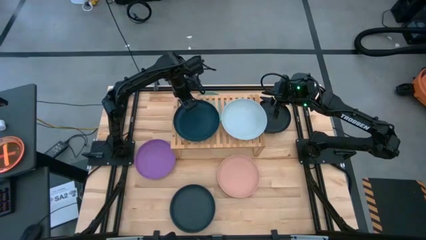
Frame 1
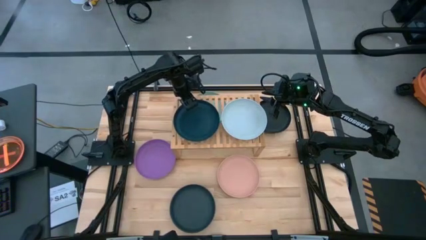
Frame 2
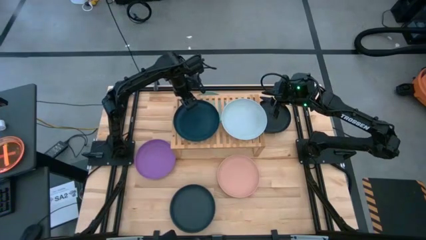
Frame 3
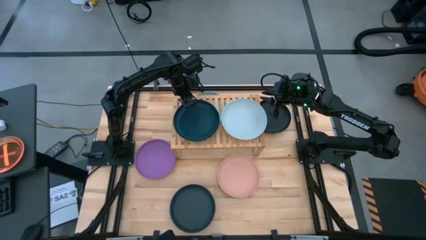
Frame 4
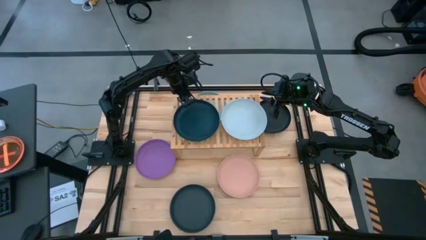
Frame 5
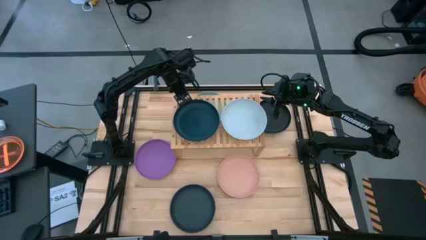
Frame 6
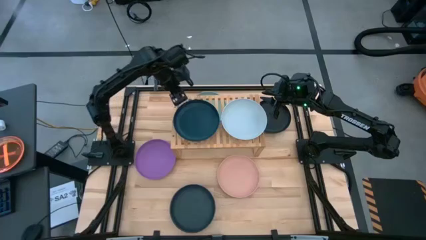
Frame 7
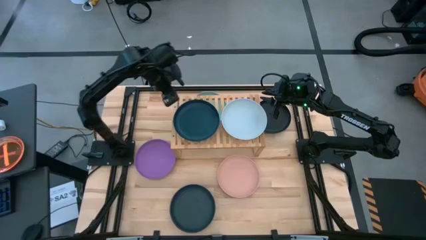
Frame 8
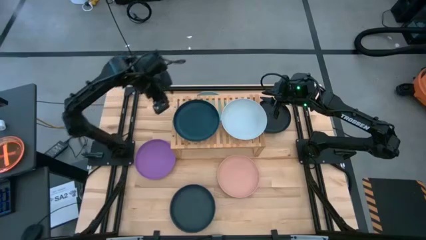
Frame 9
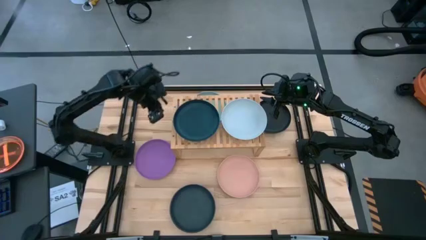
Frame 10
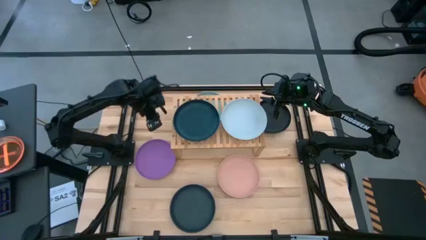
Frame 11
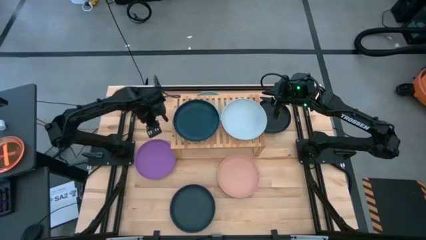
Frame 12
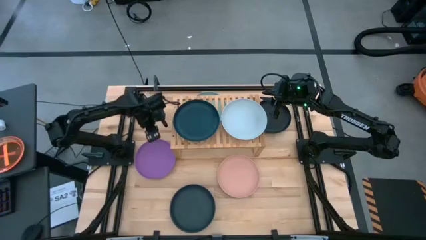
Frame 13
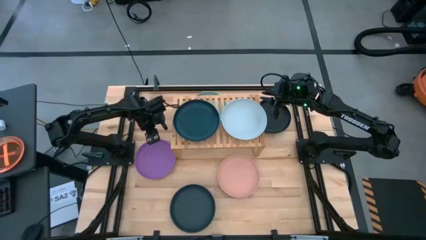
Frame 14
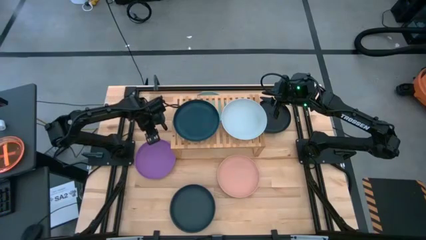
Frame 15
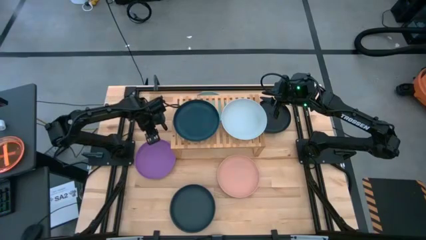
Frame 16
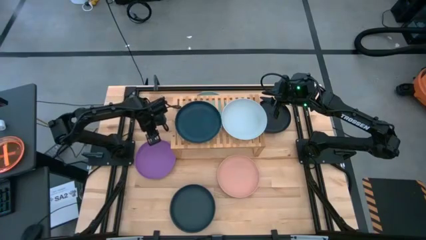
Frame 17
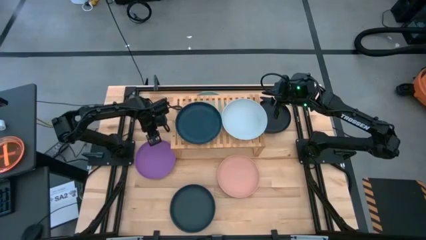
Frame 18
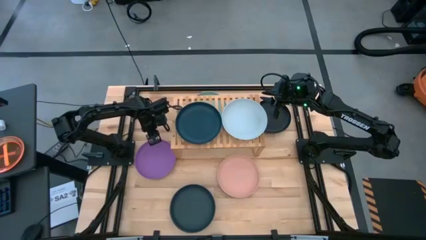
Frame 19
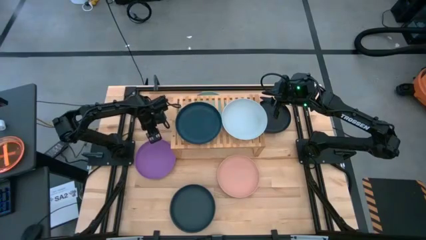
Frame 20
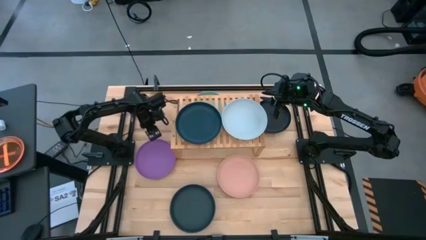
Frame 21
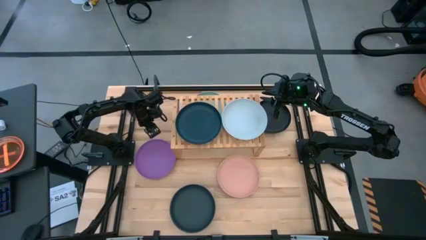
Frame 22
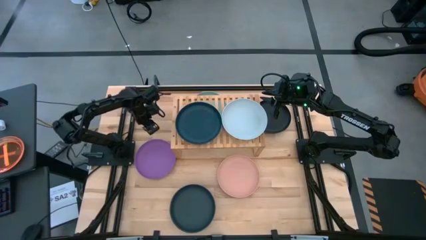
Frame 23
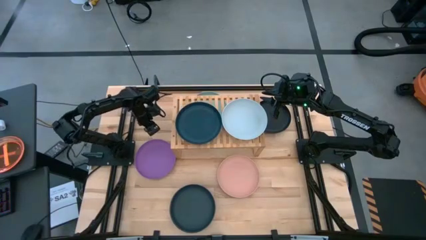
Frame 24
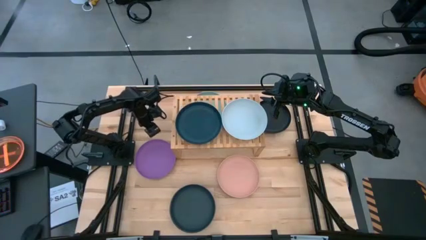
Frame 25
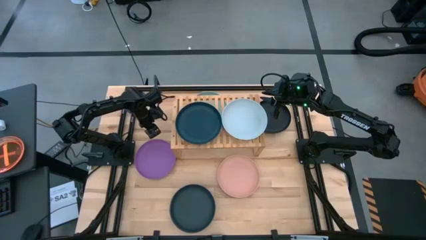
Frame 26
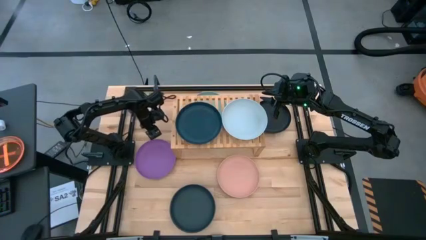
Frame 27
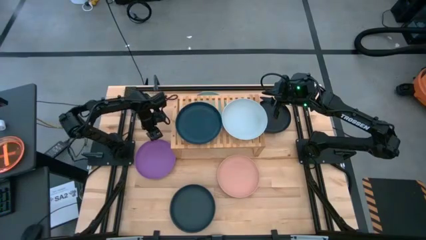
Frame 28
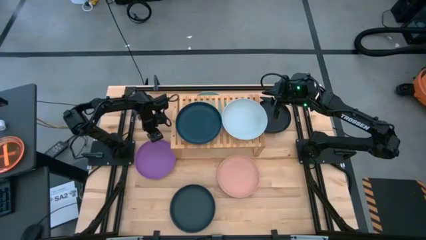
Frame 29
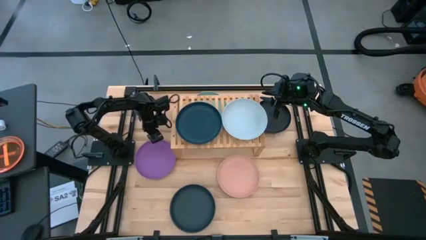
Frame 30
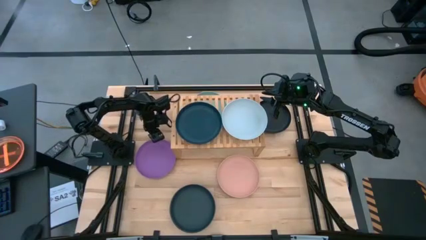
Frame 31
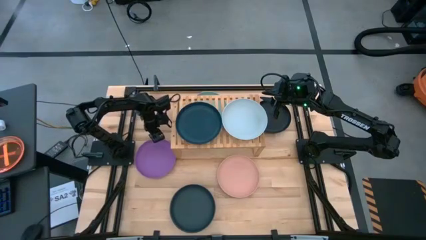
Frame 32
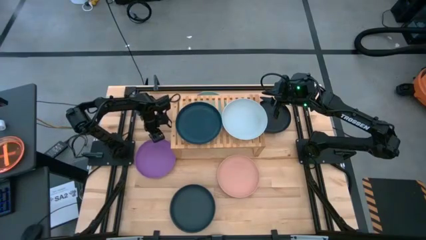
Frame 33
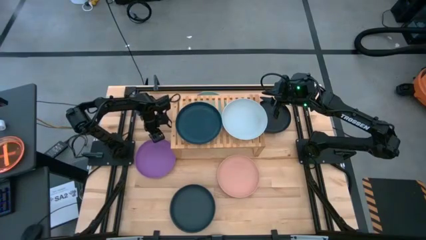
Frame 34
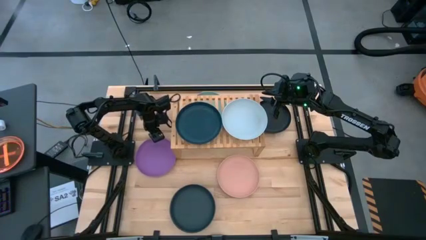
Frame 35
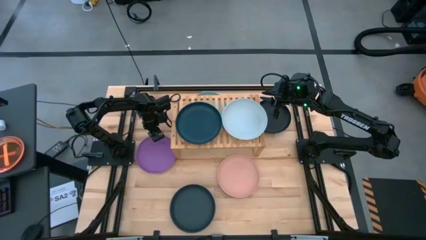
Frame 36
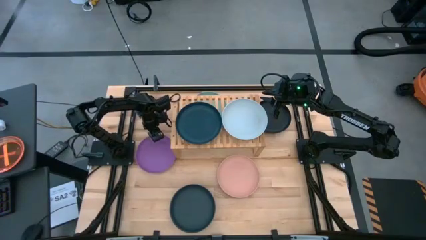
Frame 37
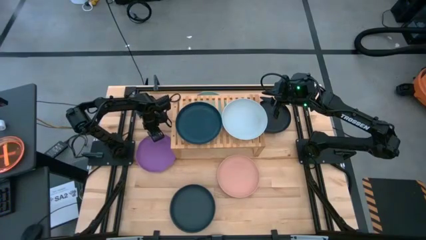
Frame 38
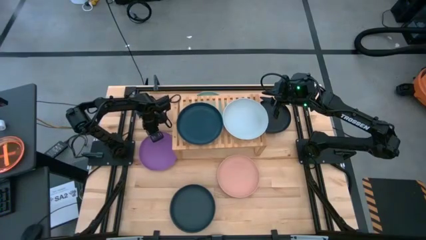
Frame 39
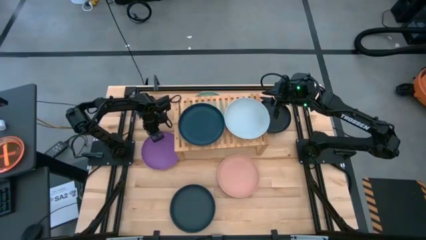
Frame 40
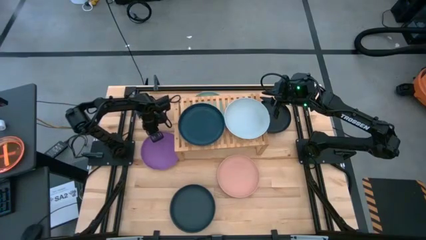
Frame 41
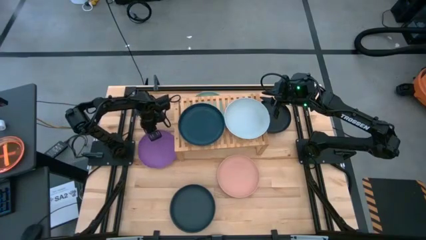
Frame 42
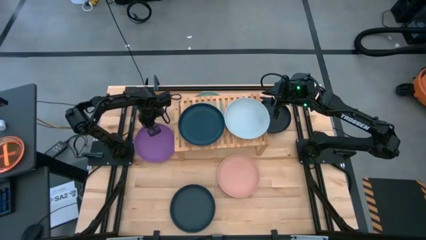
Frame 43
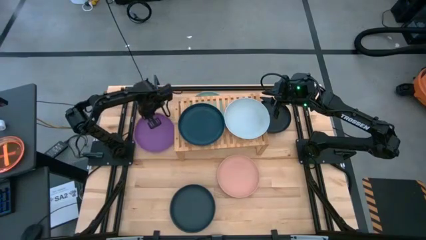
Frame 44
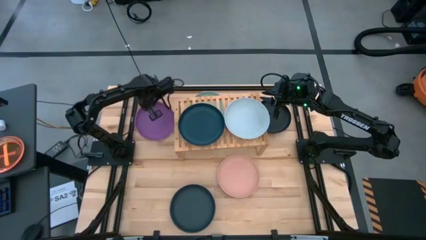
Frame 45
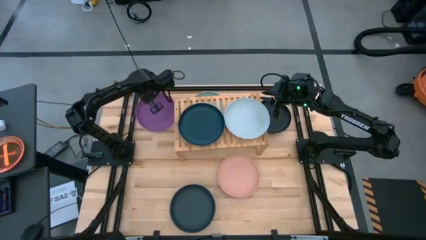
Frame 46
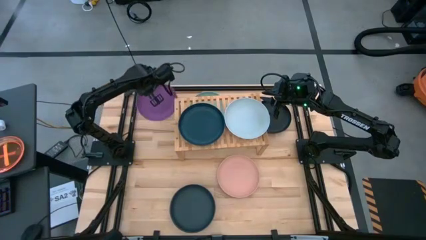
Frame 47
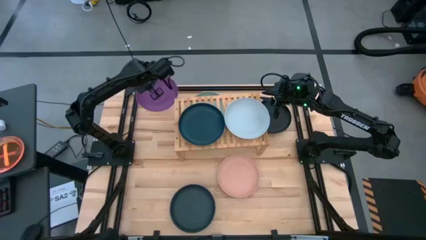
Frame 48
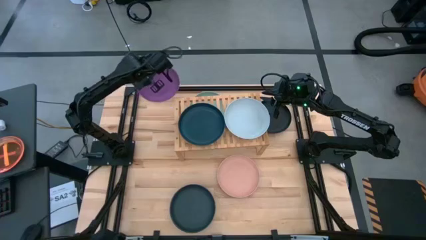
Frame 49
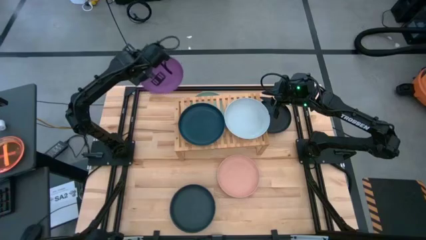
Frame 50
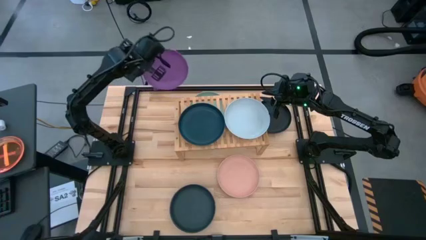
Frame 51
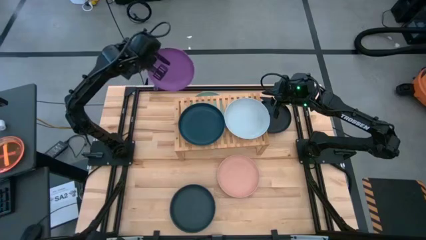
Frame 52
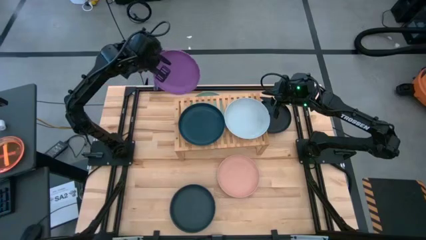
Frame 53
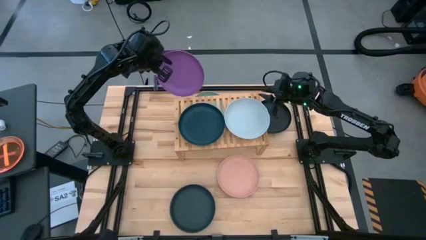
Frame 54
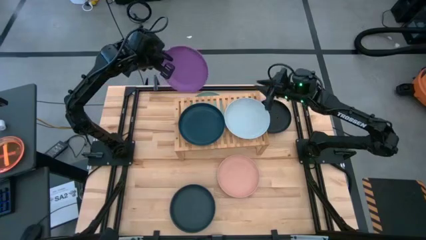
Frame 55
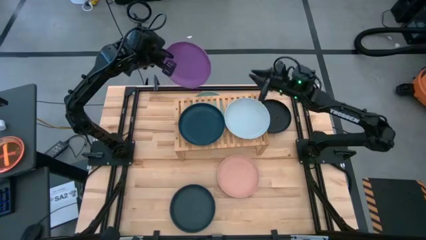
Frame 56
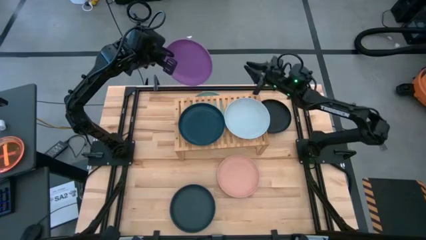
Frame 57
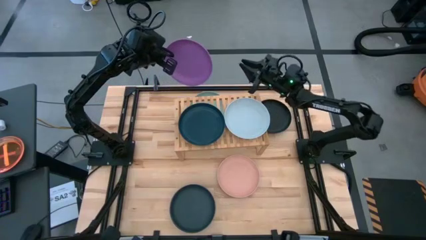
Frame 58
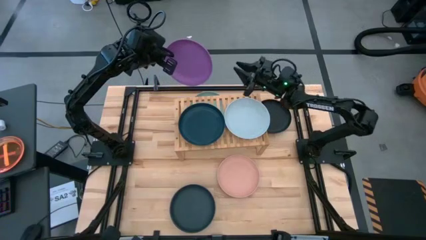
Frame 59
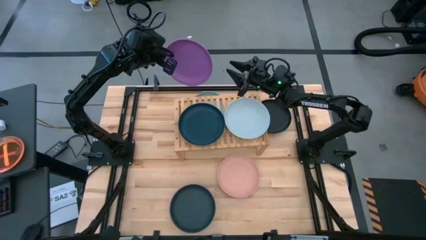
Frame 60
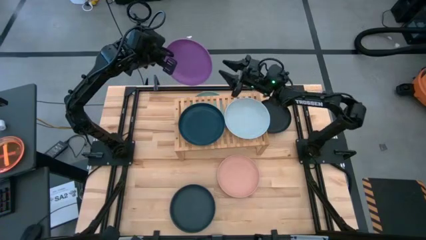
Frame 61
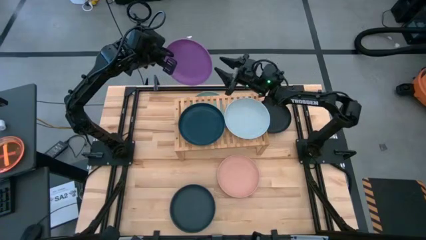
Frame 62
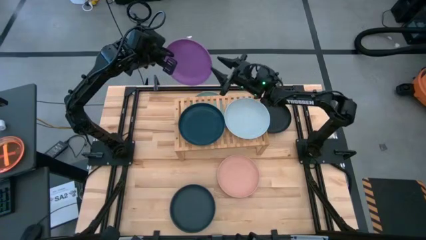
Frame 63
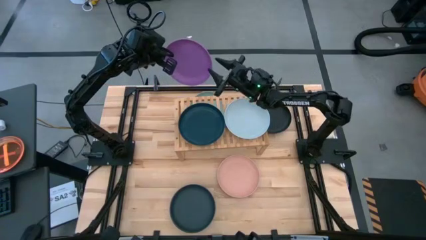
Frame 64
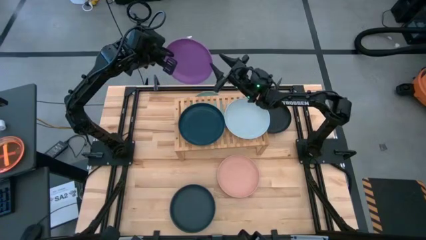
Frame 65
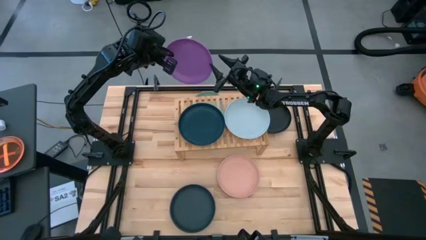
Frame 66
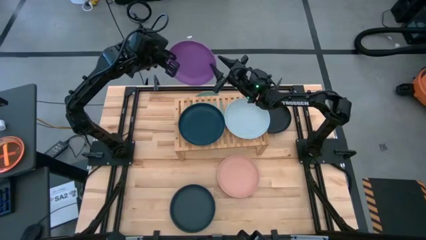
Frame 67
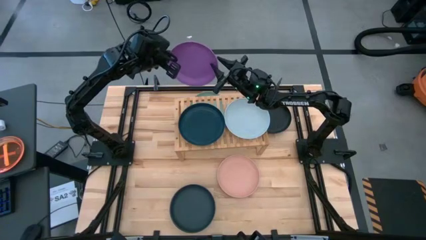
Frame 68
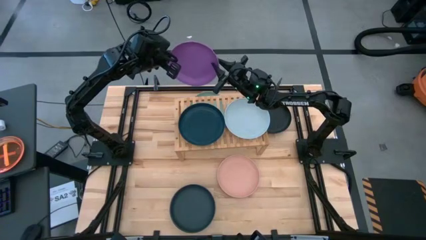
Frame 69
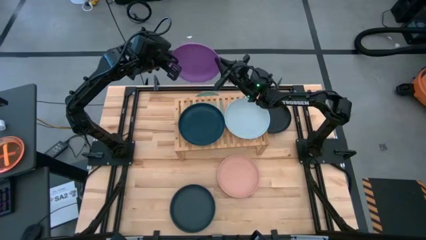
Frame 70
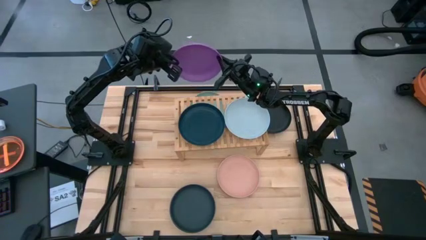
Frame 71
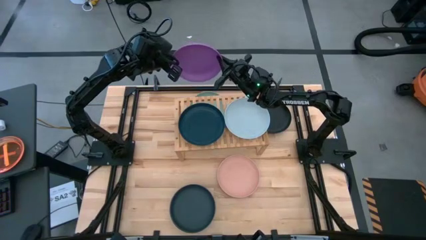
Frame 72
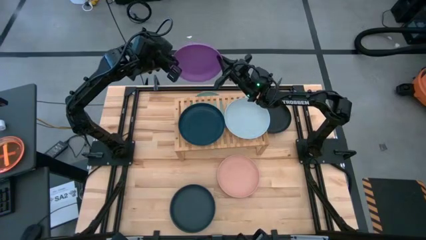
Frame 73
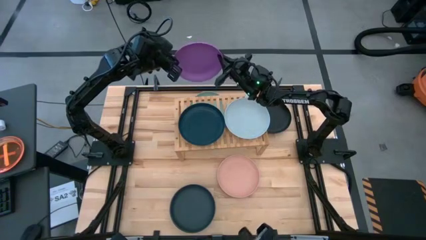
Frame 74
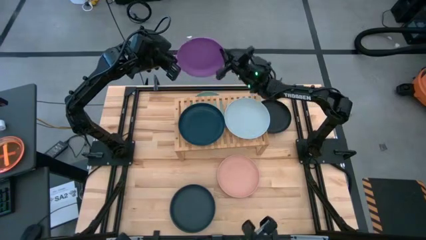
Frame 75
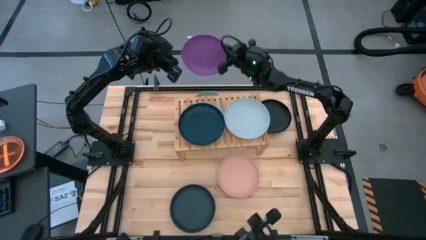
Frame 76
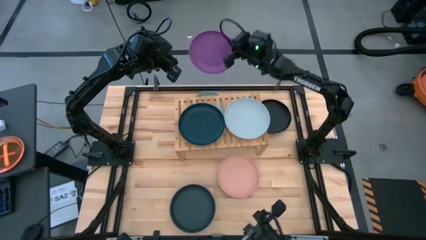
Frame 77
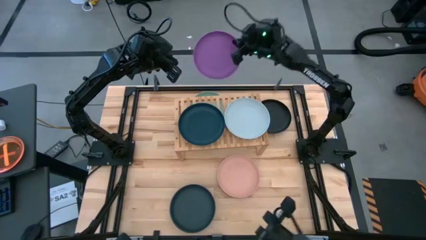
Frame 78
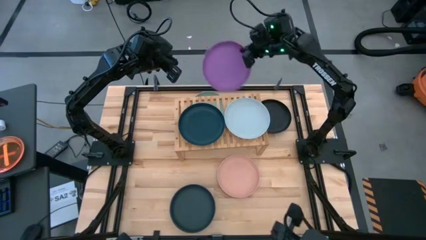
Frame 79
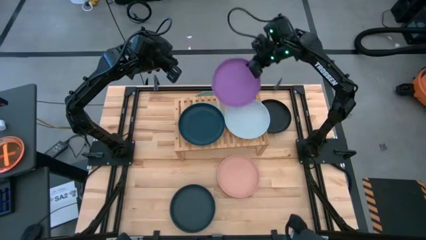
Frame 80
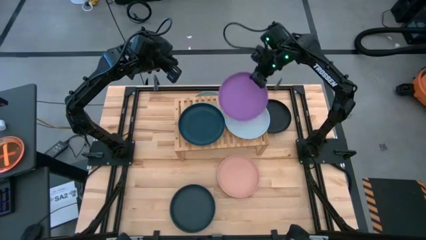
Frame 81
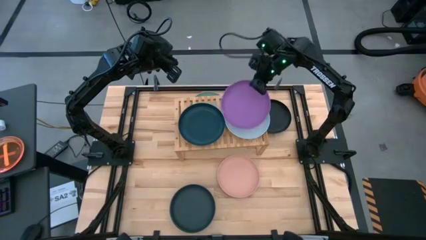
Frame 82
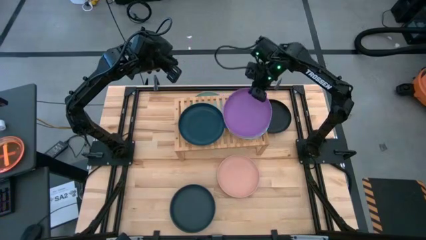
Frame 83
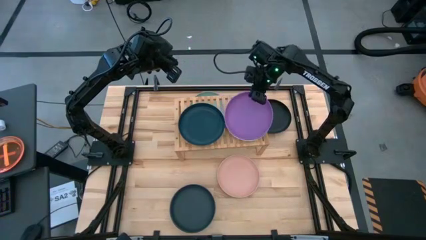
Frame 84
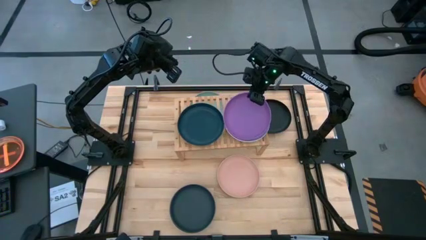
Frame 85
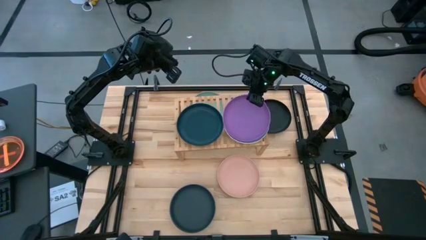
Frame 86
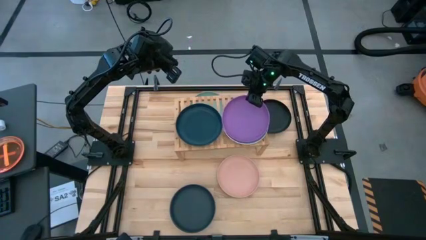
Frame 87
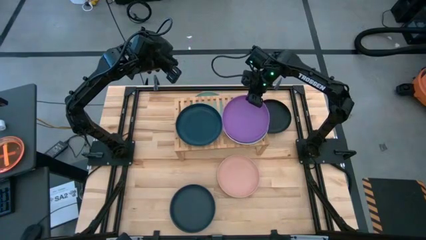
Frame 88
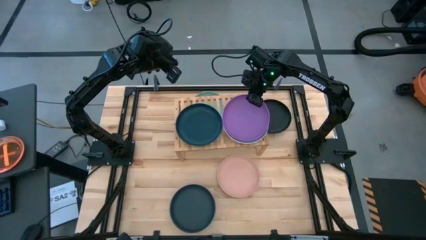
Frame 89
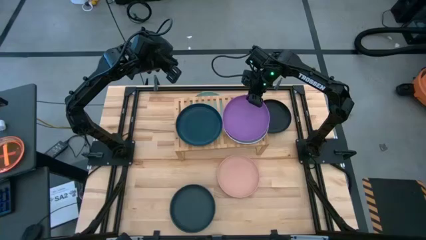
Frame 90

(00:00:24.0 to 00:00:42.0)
Task: Place and stack plates onto a shelf
Stack the purple plate on top of the light blue plate on the shelf
